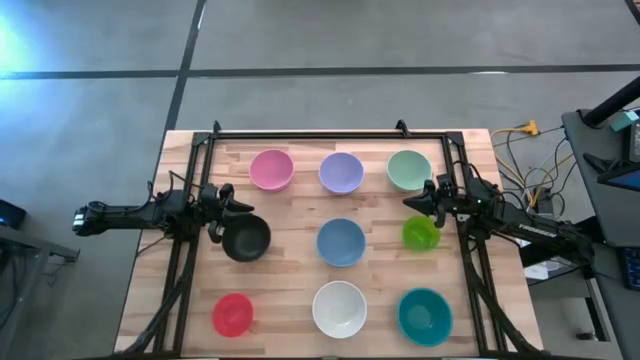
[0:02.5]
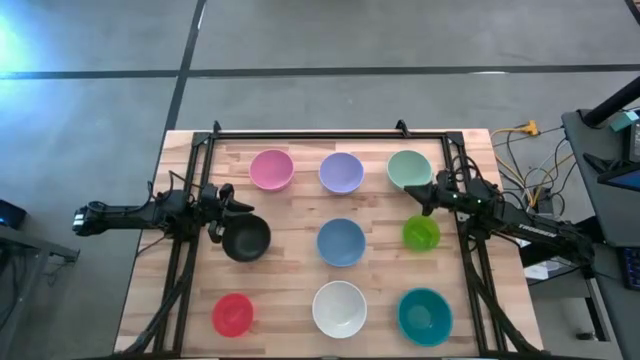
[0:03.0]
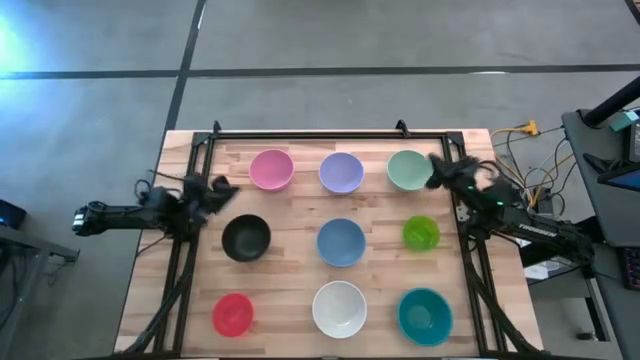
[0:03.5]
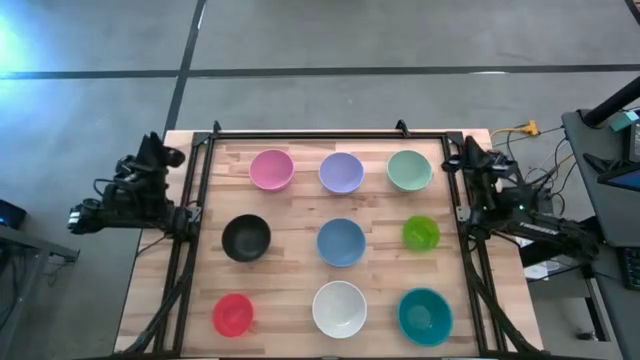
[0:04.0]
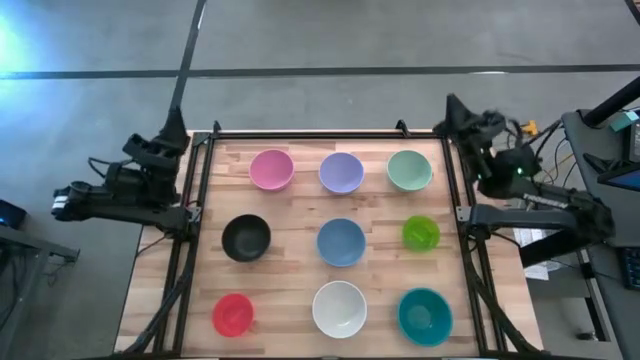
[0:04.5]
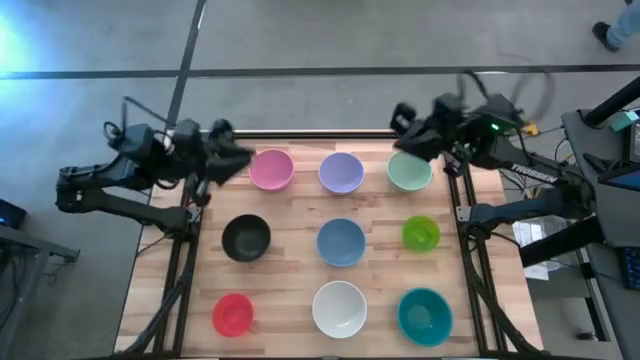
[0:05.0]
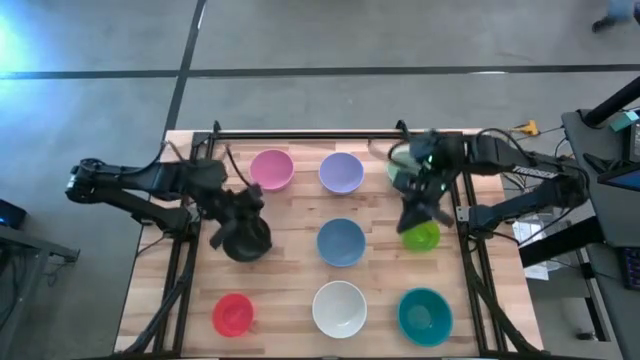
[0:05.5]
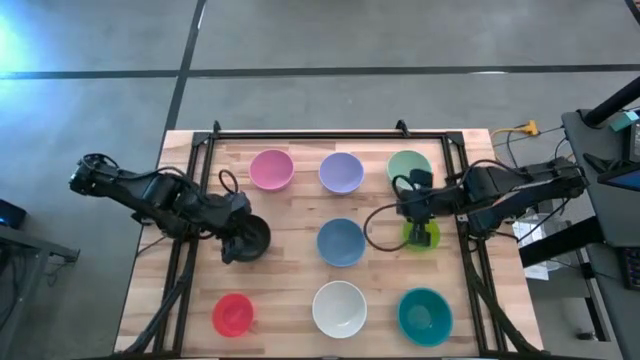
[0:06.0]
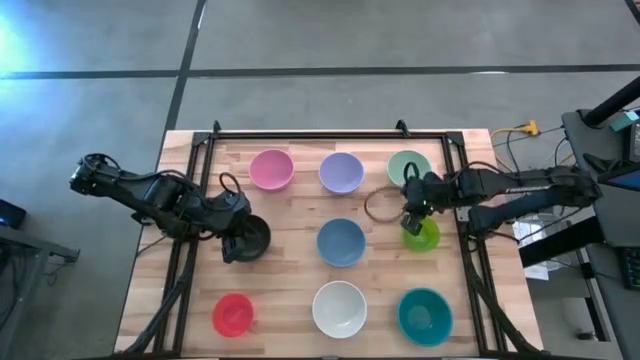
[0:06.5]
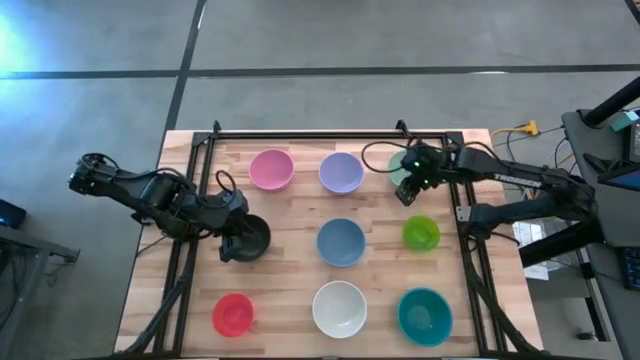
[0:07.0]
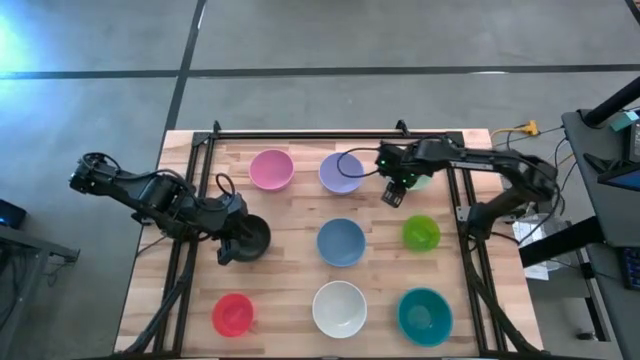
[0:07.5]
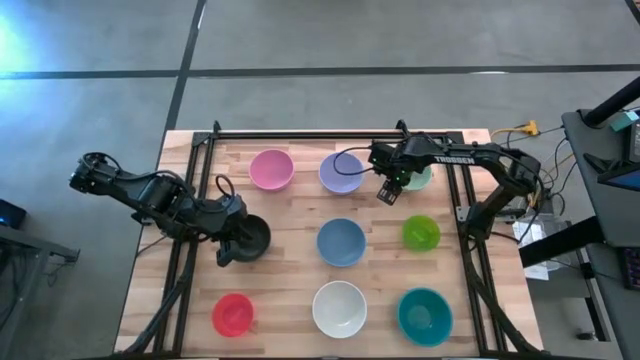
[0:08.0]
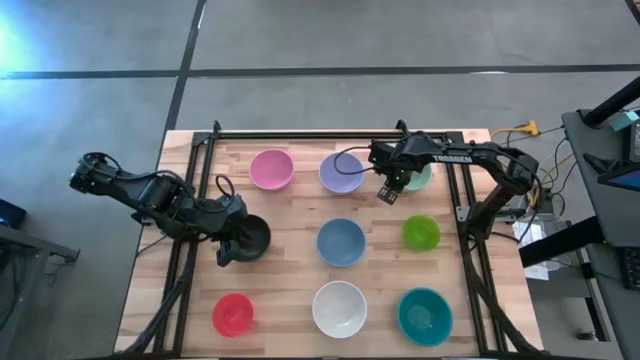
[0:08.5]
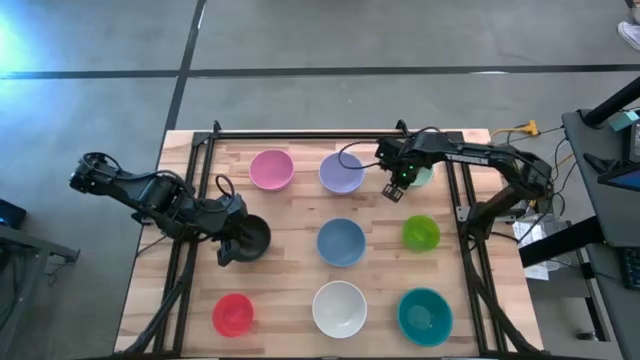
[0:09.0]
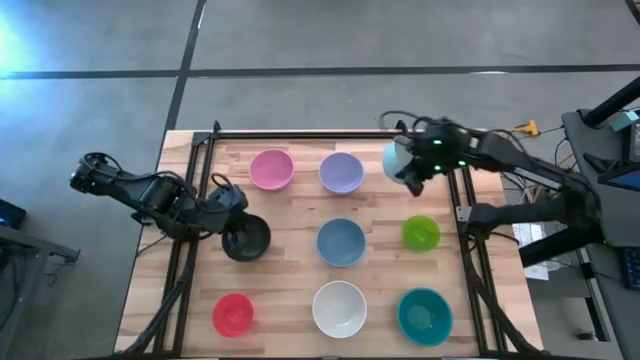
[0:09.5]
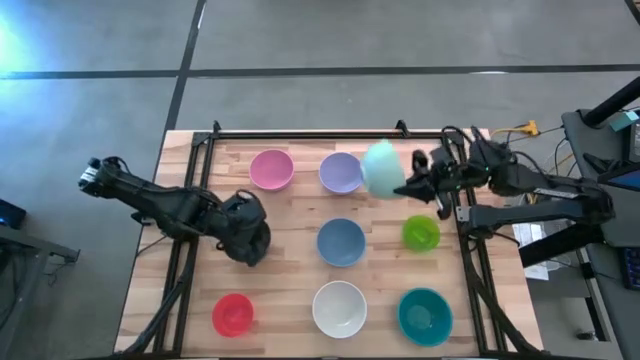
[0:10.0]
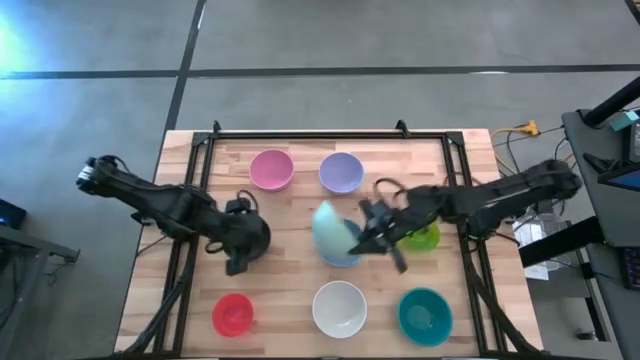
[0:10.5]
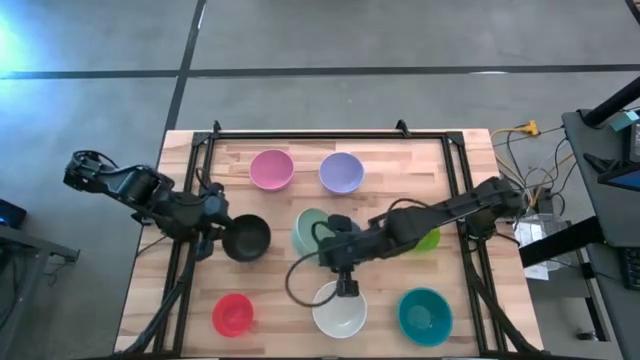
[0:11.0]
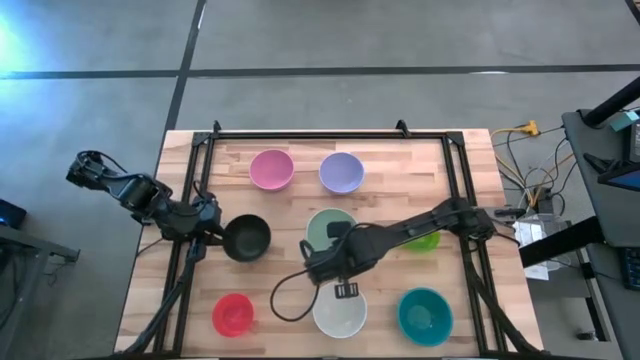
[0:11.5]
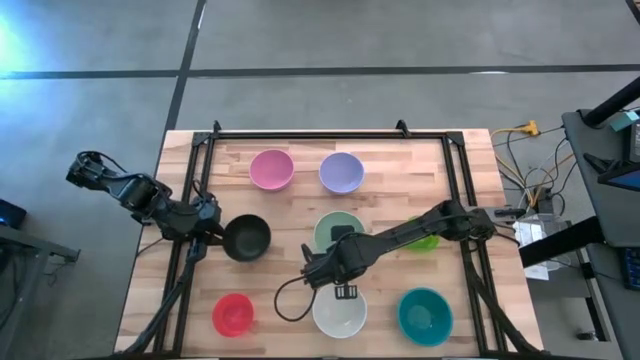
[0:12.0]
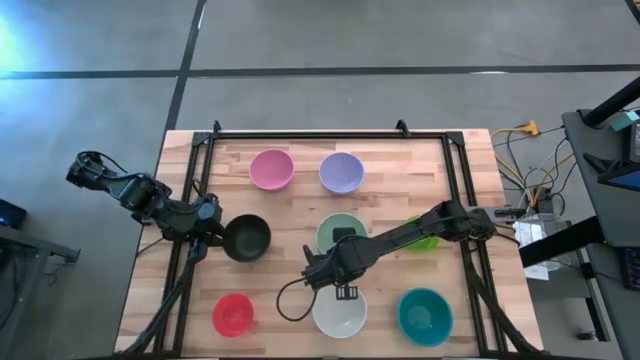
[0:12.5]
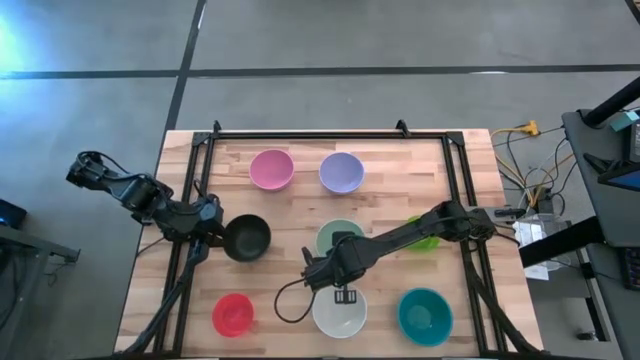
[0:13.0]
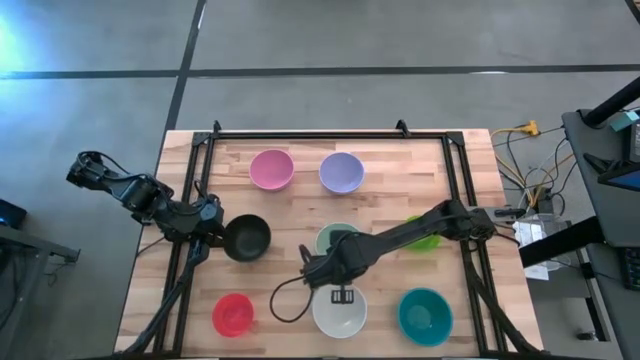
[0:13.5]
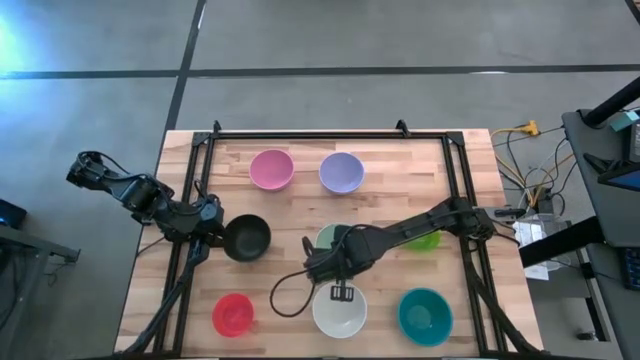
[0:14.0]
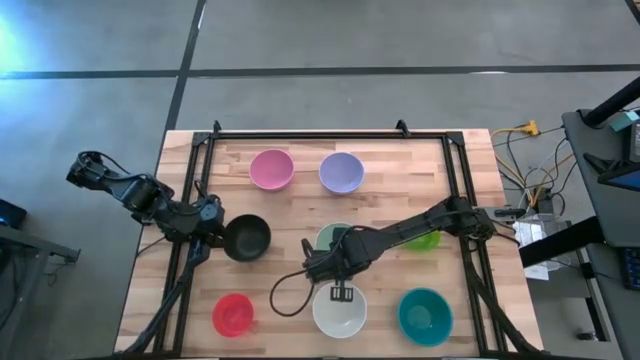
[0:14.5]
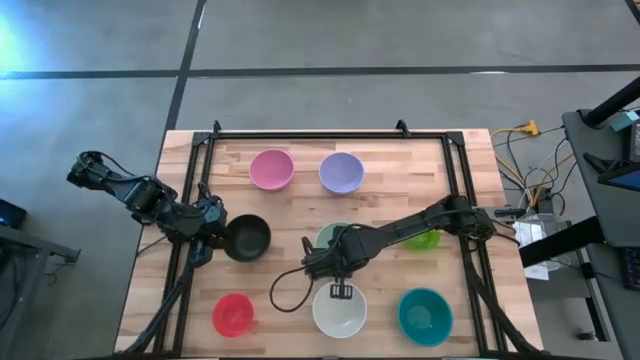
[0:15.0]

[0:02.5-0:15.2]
Task: Nest bowls inside each other
Stack the light green bowl on top of the blue bowl

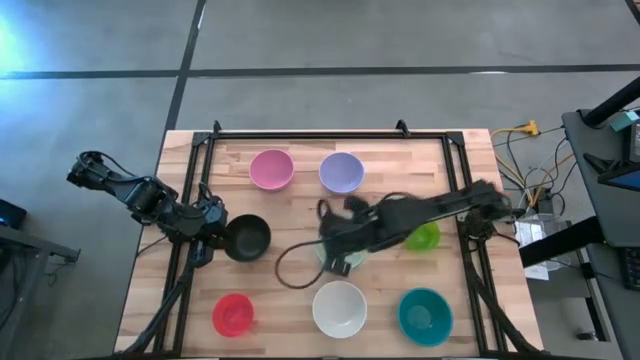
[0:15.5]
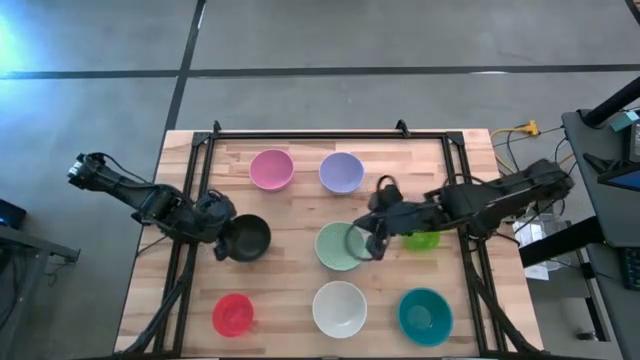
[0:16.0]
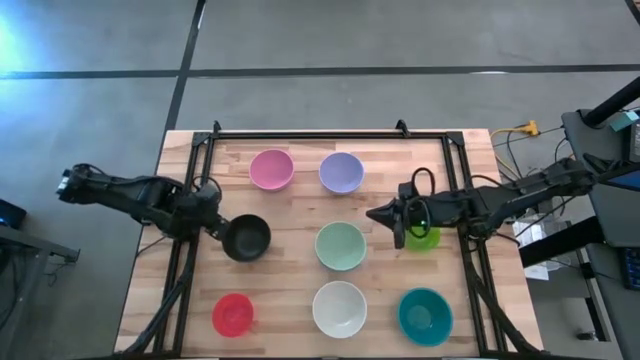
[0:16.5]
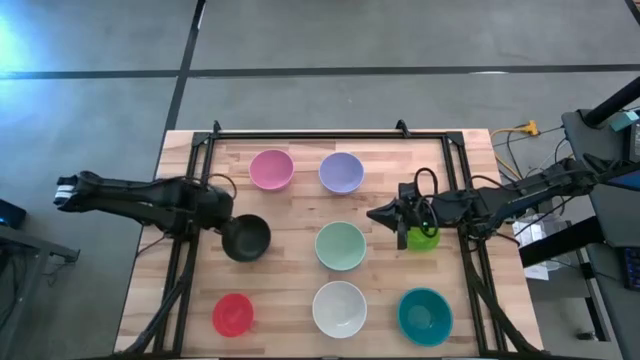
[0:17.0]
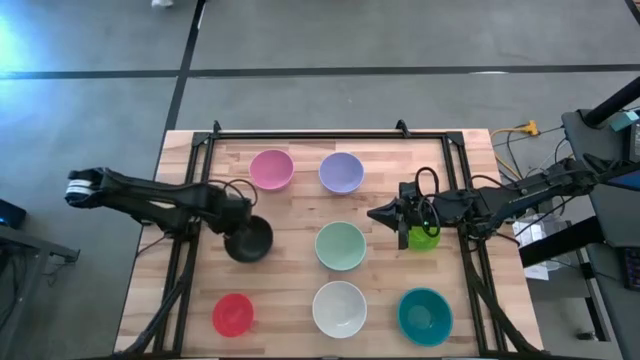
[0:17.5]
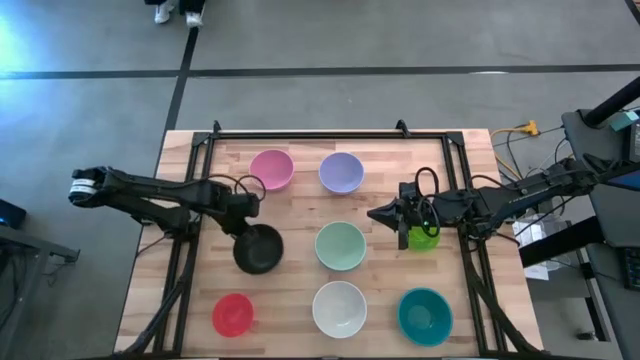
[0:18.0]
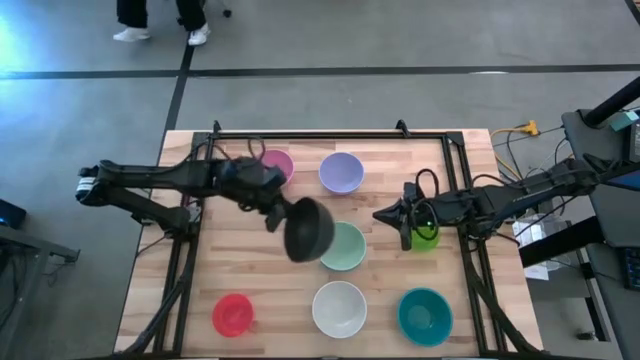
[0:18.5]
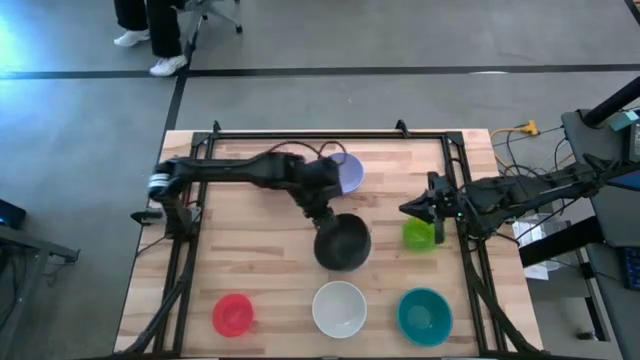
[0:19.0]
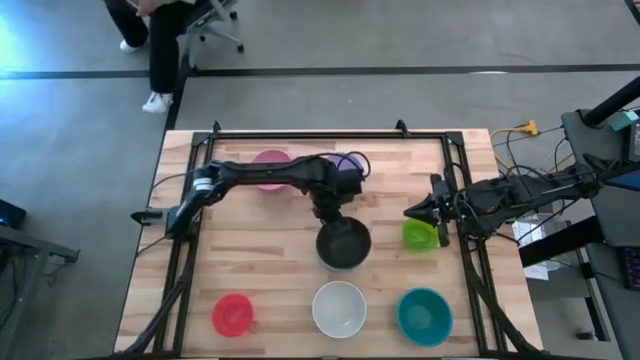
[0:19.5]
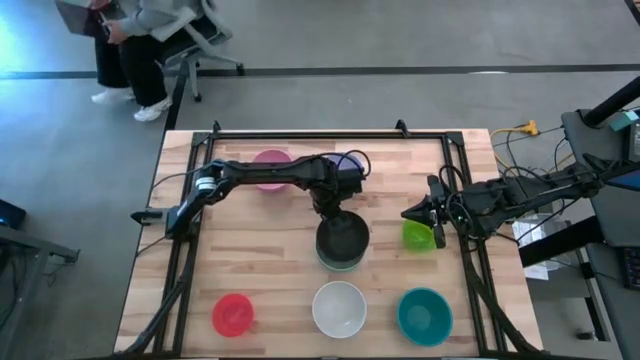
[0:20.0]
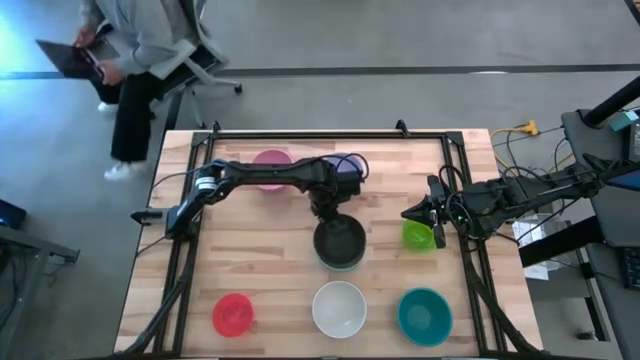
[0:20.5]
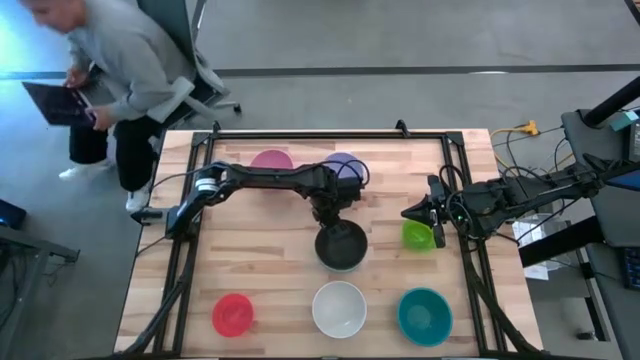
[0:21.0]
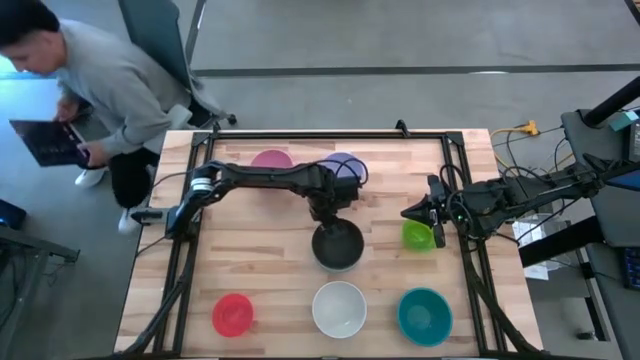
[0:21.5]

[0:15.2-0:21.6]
Stack the black bowl on top of the light green bowl

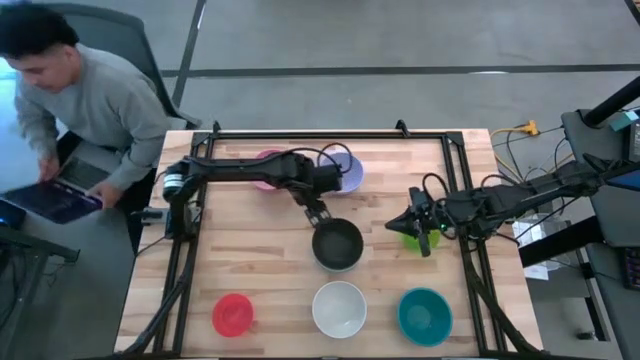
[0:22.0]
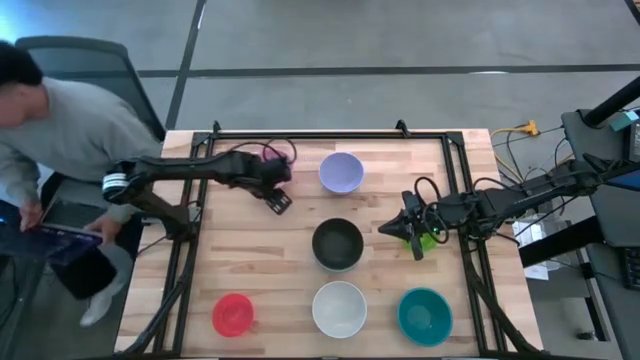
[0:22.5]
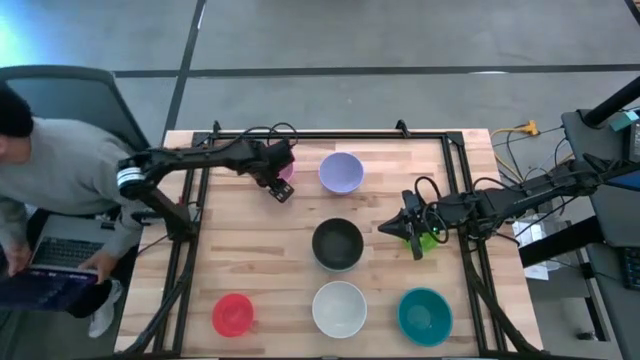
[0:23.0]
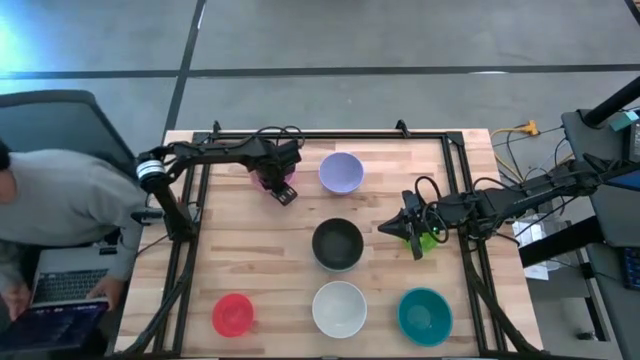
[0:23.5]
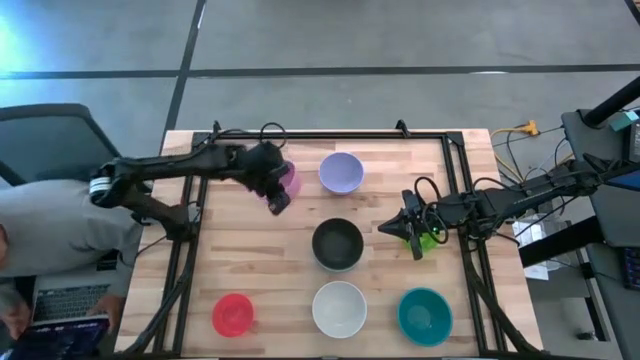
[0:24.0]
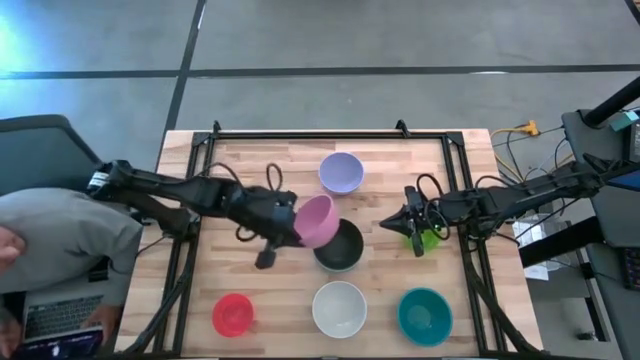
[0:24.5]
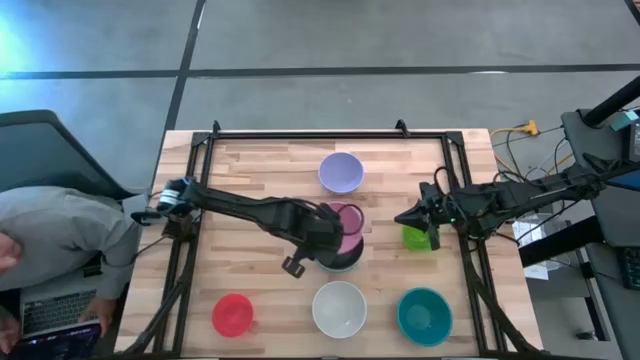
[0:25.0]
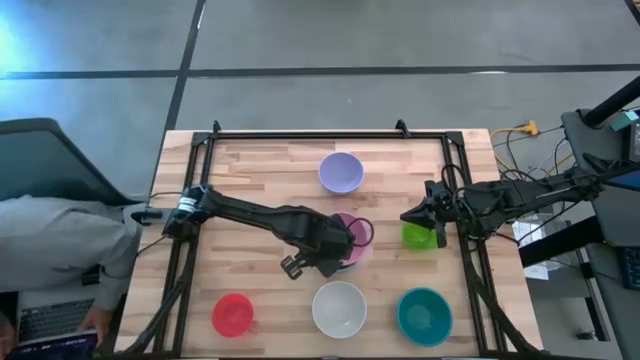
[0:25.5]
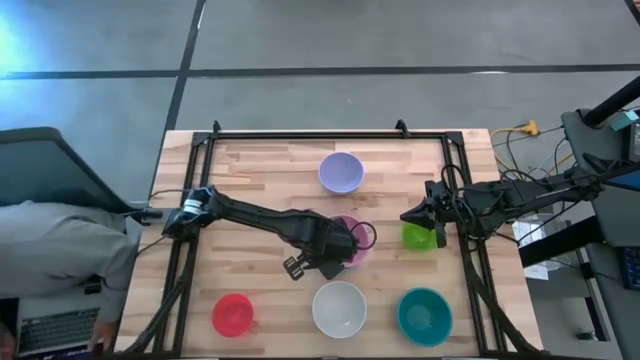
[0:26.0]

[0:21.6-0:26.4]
Stack the pink bowl on top of the black bowl
